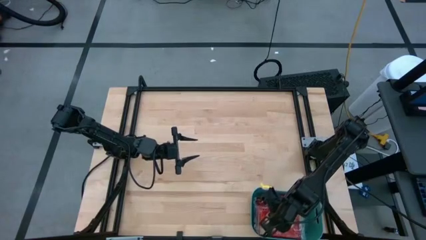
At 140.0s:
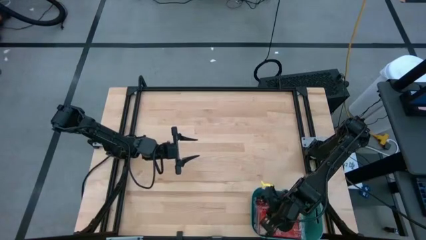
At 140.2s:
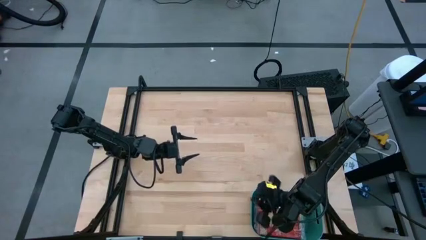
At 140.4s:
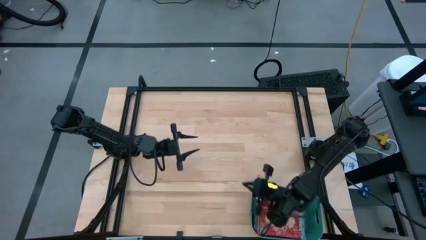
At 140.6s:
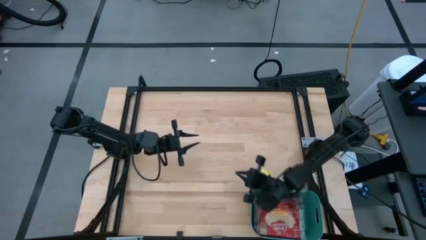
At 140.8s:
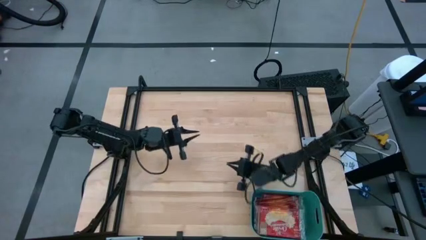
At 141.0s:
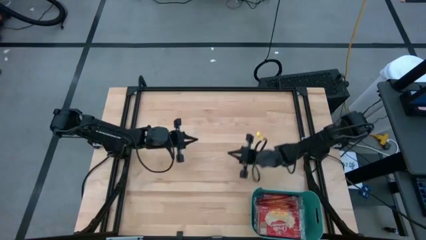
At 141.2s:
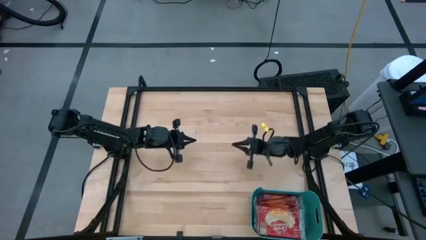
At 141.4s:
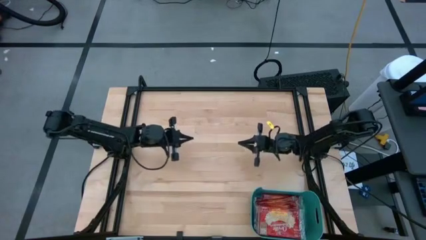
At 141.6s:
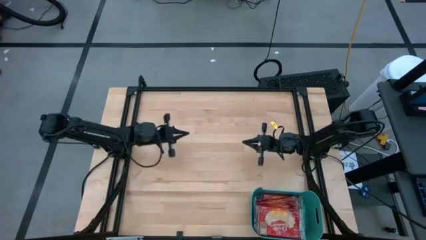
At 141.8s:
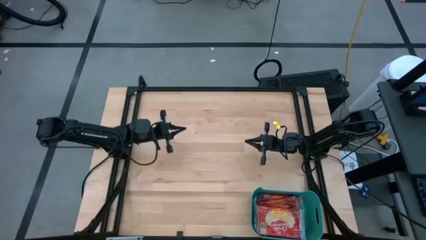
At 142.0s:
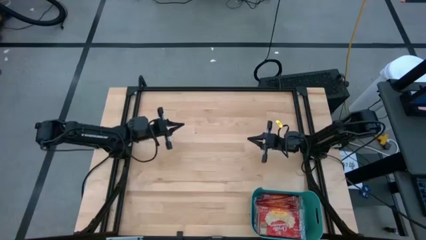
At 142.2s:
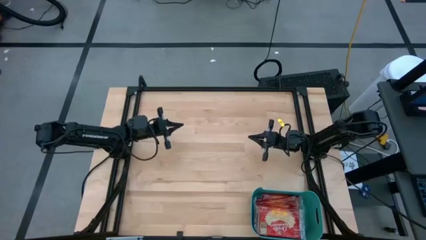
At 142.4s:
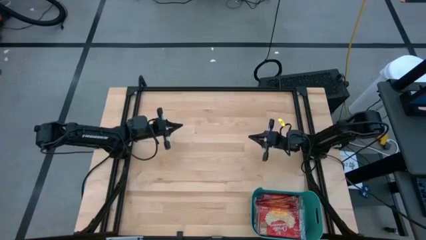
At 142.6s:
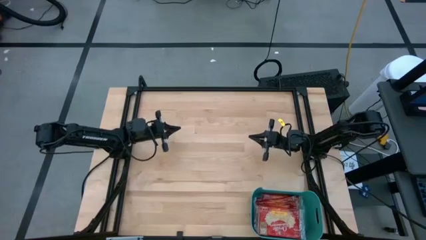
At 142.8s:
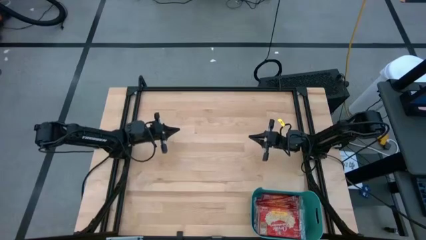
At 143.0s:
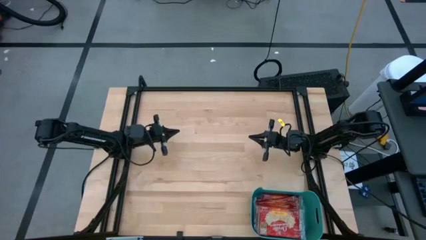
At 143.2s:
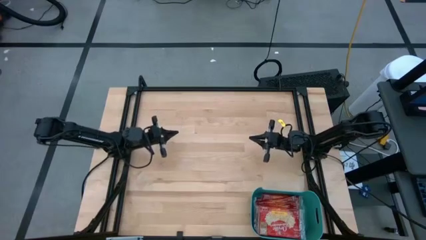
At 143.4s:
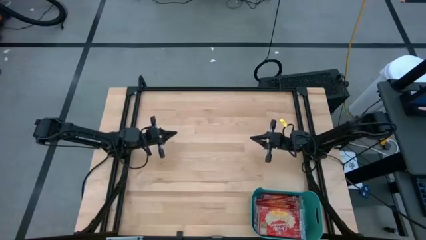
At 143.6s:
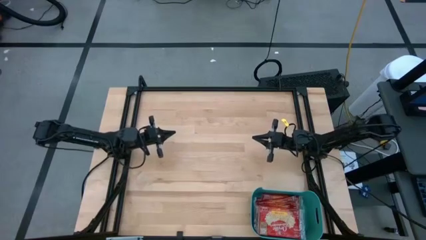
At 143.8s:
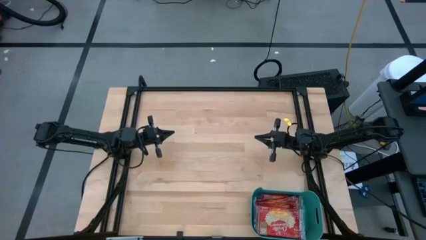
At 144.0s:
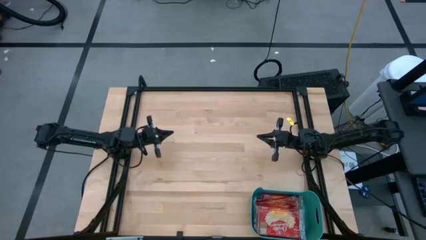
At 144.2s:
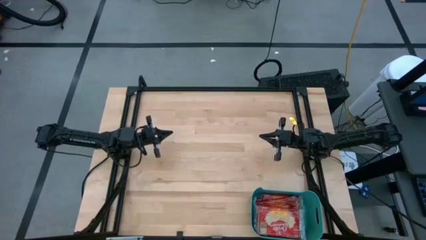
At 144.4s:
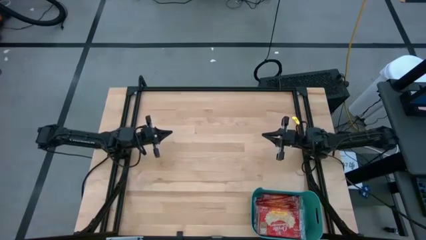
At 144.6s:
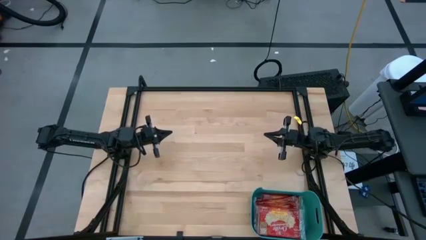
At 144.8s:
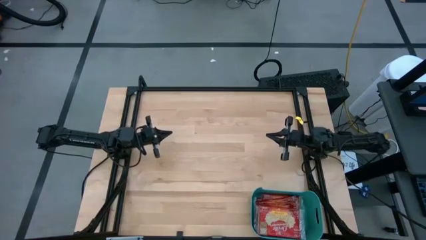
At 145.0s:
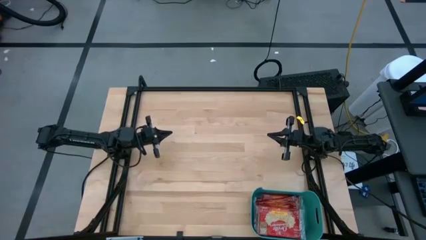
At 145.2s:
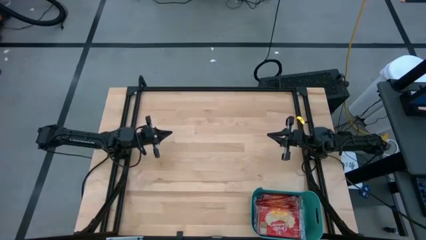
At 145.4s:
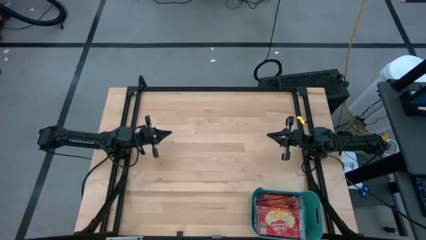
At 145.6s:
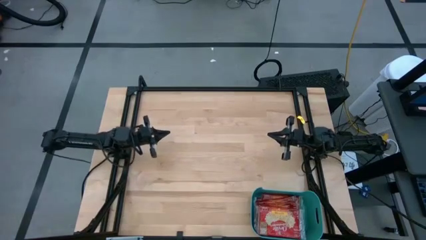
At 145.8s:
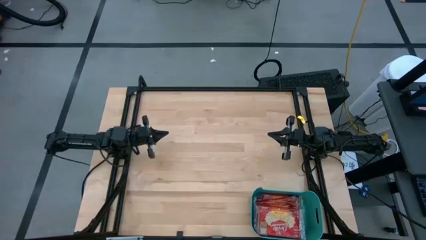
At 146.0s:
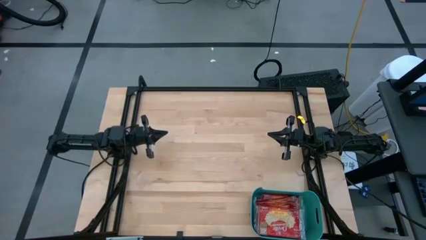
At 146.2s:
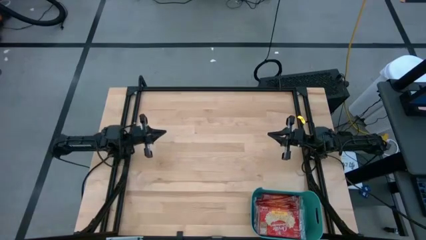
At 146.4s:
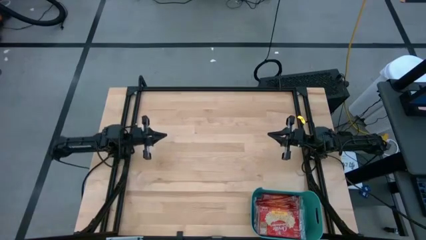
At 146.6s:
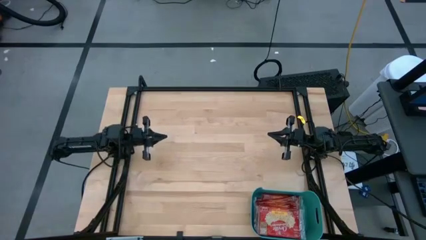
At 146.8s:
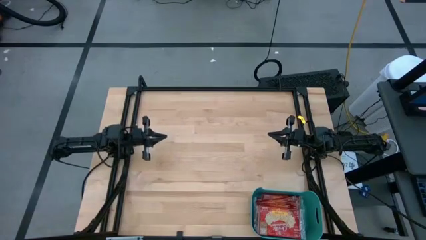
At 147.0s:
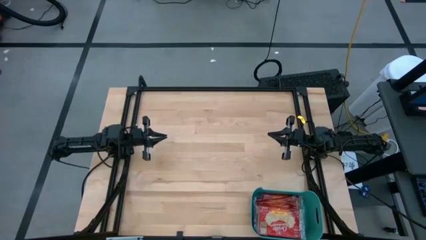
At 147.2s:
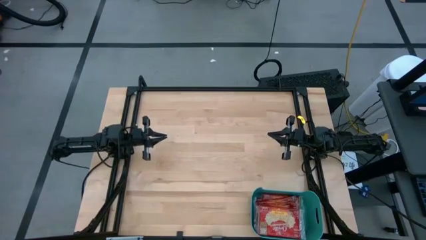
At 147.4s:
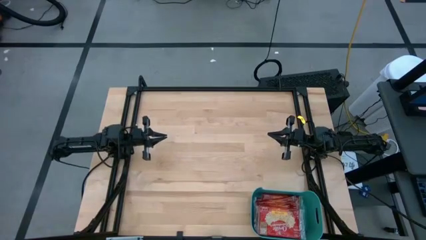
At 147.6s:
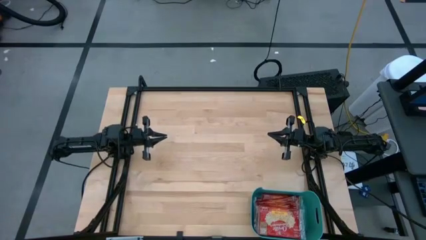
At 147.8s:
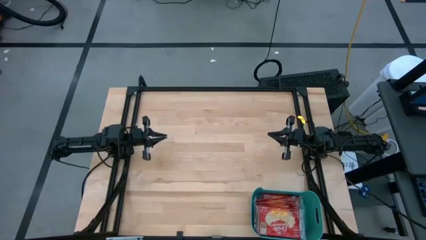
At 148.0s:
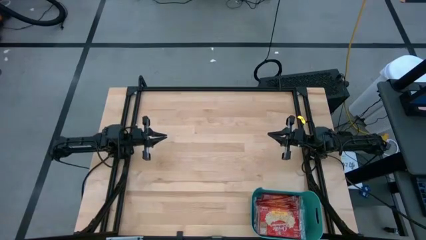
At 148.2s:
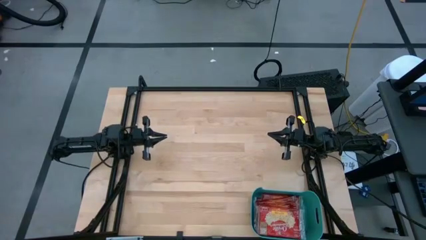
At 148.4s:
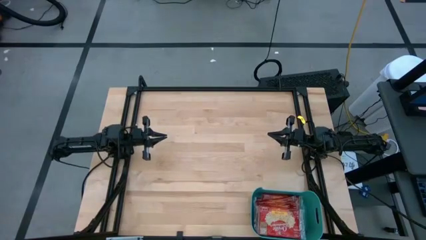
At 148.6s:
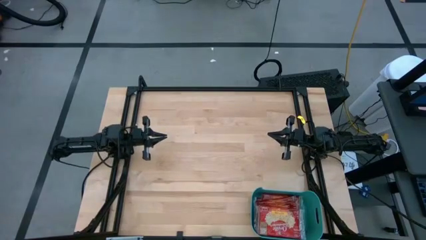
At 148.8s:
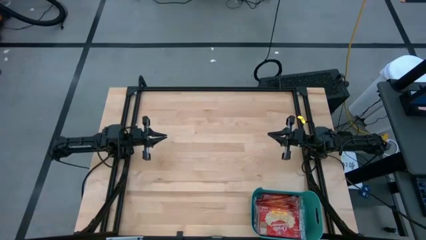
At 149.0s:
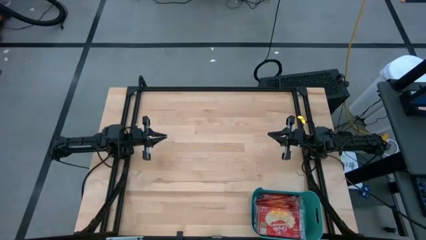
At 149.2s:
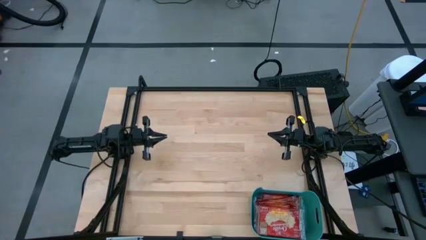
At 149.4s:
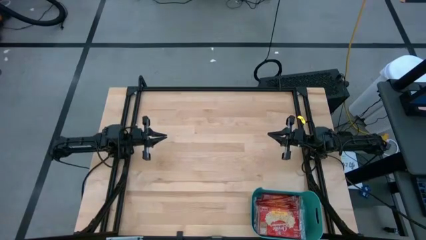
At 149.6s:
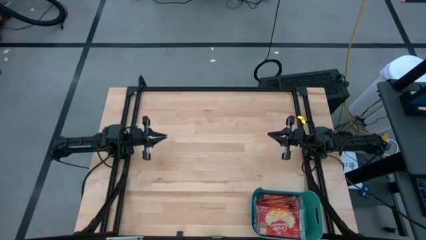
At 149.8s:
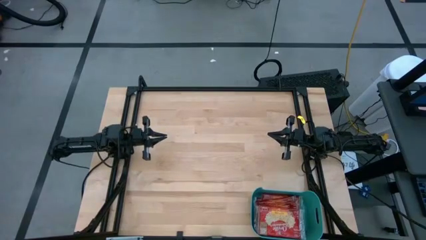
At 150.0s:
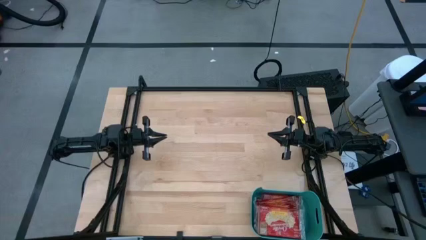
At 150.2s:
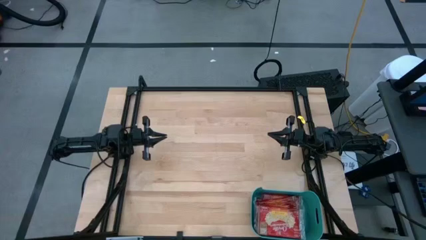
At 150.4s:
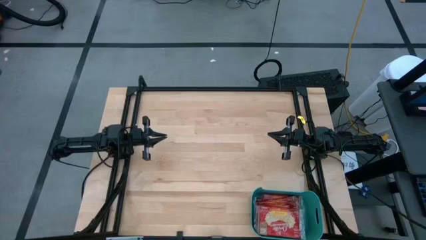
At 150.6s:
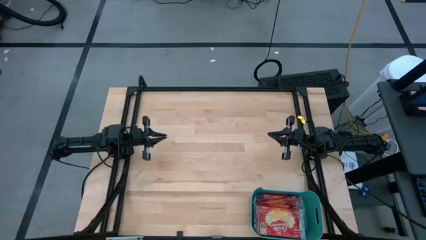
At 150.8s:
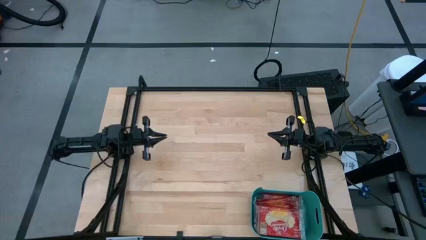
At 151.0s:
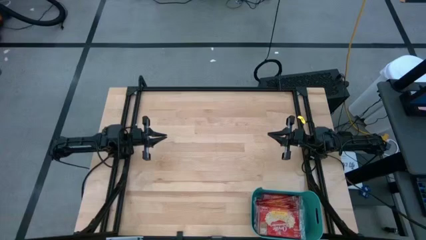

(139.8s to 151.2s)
Task: Sort popcorn bags into baskets
Return to Home Position

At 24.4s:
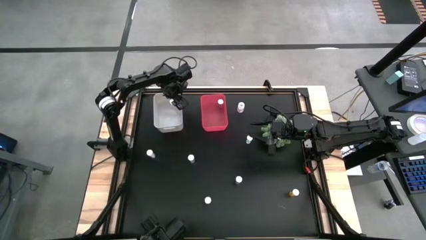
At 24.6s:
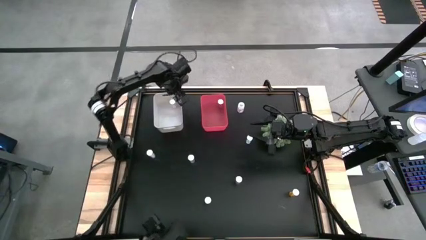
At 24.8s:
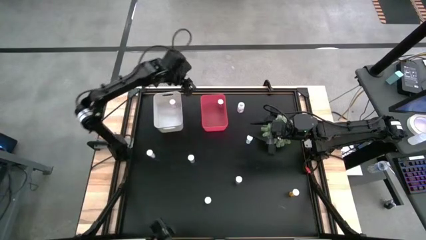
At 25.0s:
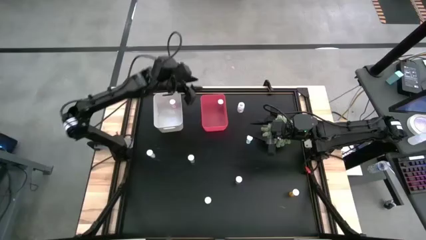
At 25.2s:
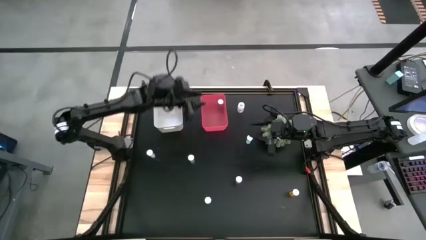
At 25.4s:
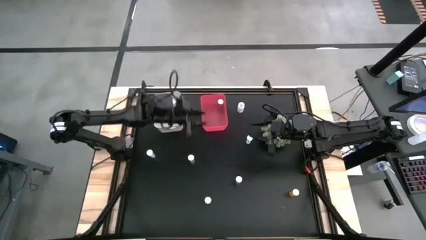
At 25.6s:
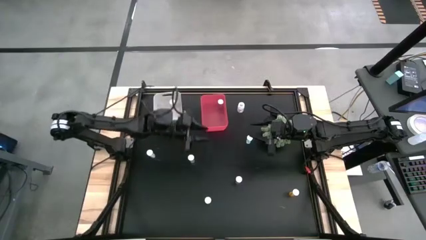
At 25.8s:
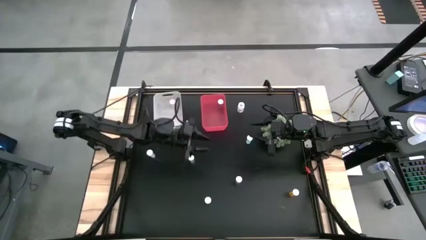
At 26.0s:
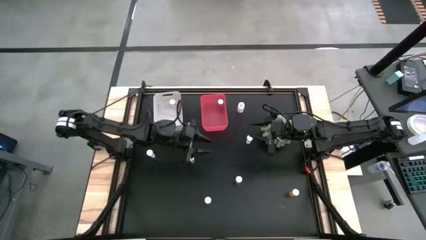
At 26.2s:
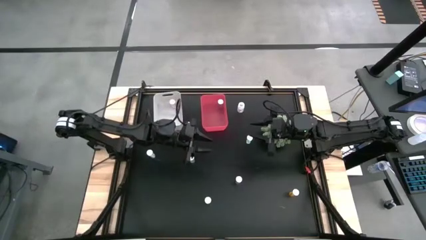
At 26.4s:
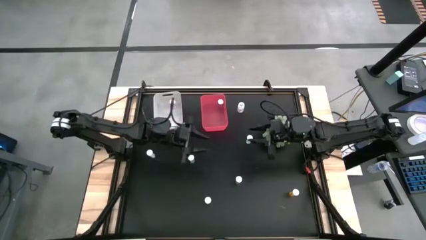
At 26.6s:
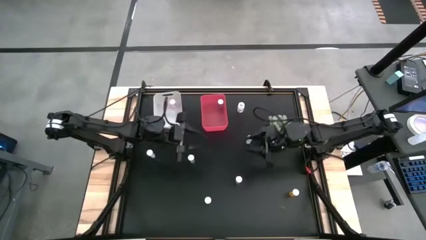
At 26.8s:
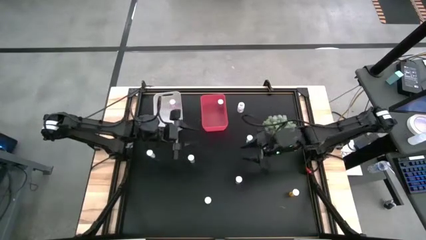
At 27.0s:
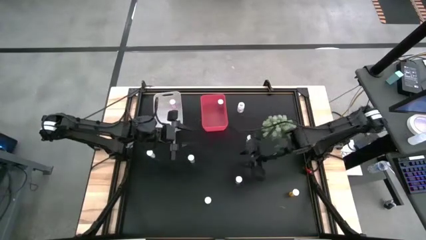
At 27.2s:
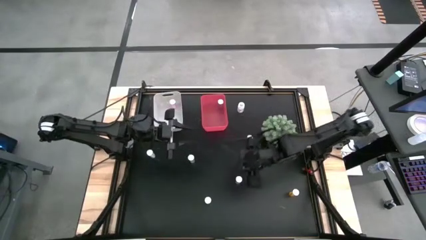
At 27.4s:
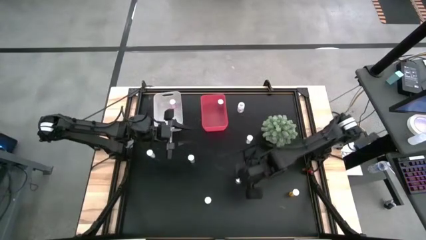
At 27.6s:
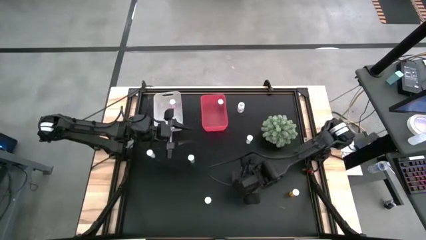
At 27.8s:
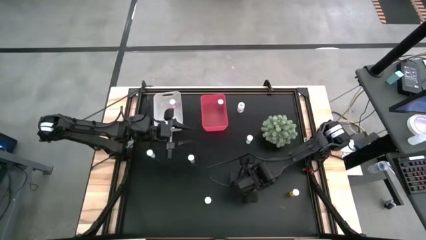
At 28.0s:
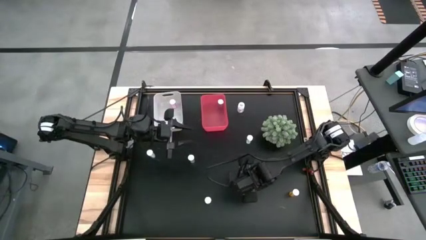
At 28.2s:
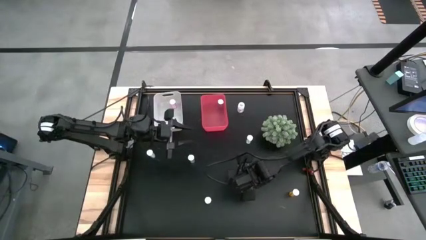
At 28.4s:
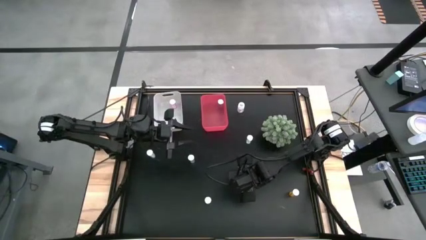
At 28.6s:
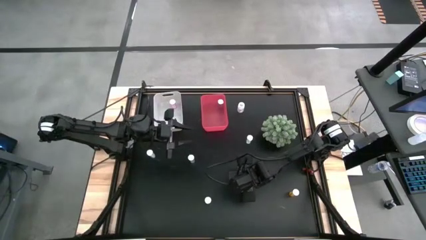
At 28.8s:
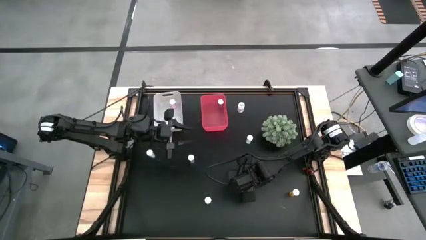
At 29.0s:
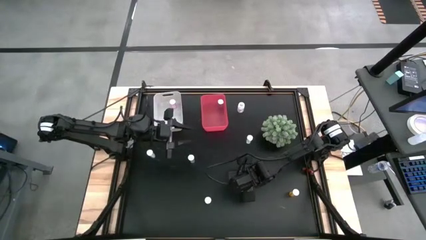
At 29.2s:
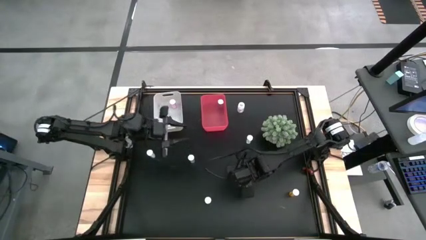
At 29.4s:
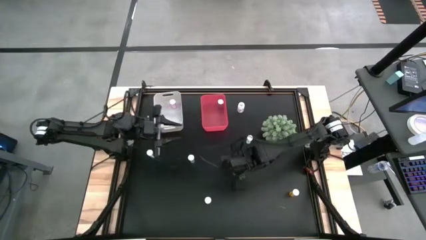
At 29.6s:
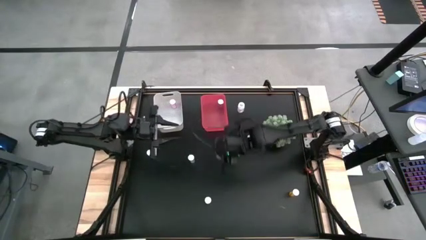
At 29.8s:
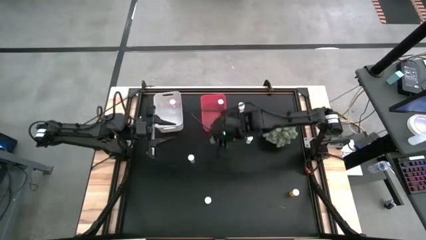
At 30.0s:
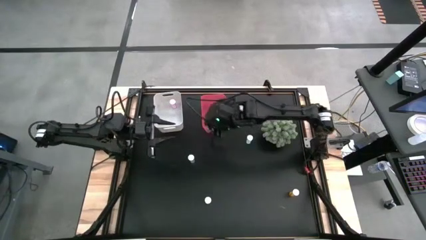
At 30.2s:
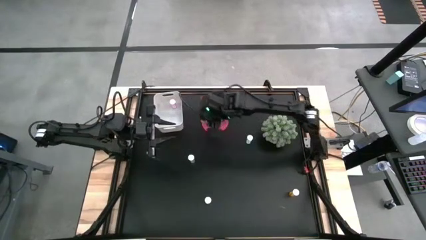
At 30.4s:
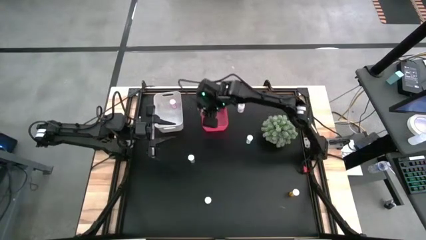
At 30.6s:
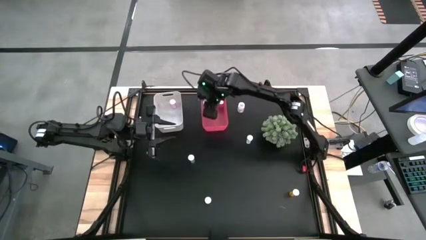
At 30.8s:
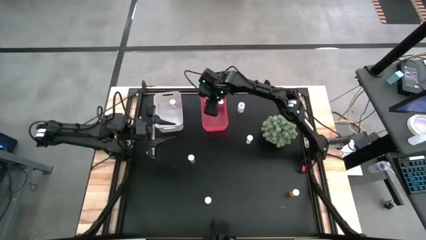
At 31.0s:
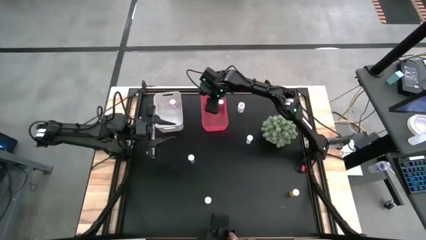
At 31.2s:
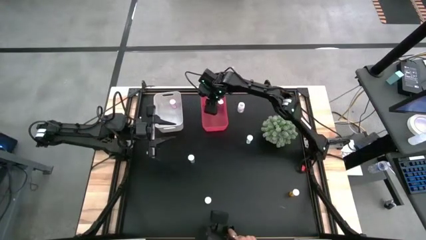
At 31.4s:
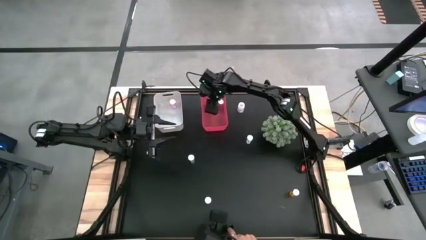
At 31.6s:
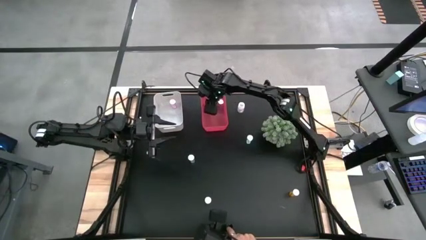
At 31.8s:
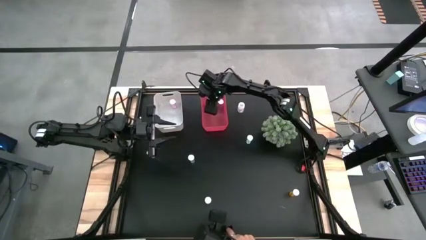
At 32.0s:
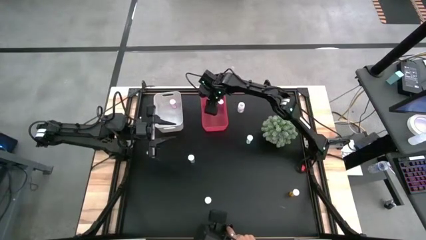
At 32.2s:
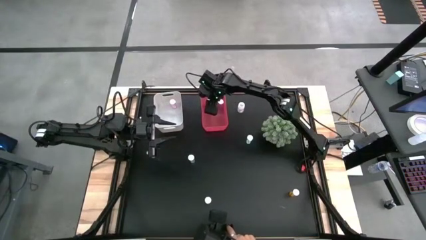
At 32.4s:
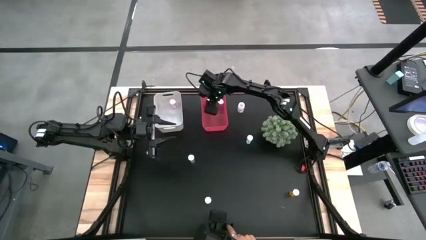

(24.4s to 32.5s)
Task: Pick and place medicine bottles into bin by pill shape (circle, oval)
Put the blue capsule bottle into the pink bin
